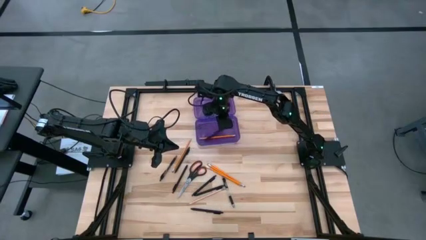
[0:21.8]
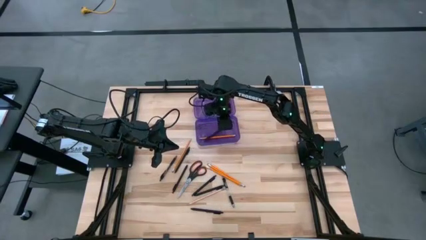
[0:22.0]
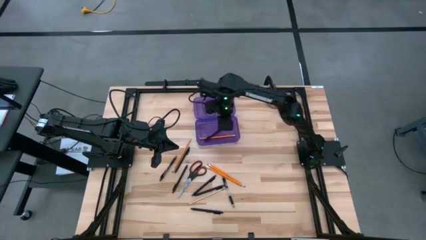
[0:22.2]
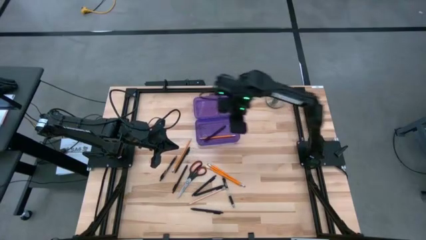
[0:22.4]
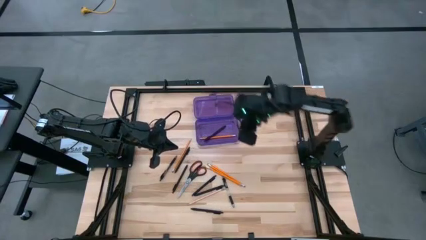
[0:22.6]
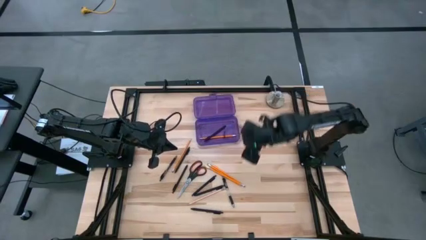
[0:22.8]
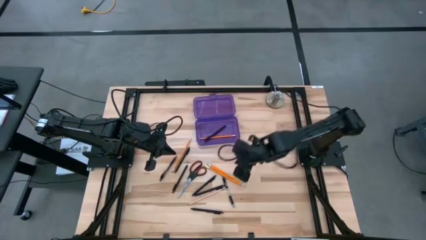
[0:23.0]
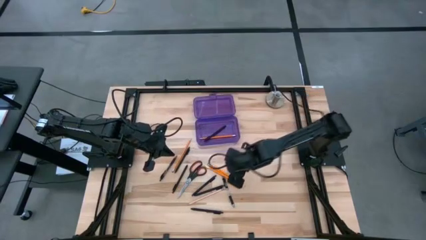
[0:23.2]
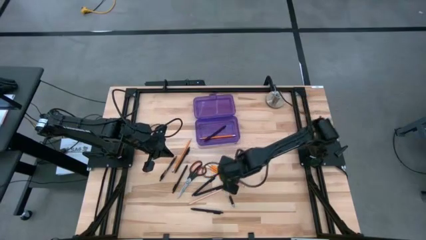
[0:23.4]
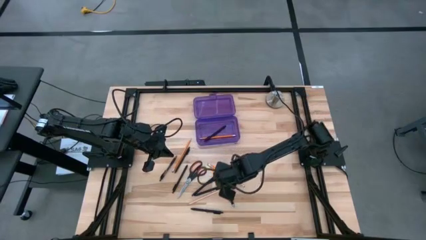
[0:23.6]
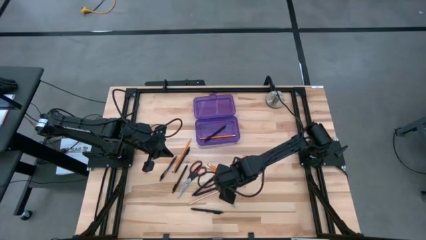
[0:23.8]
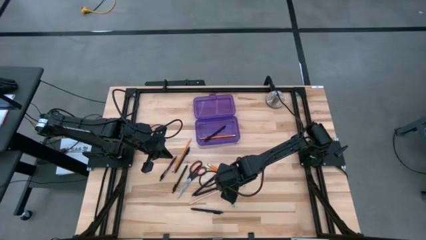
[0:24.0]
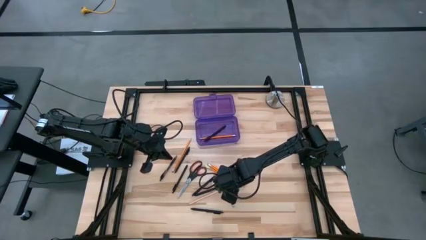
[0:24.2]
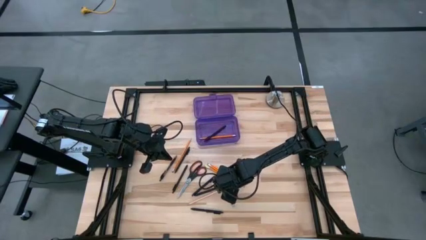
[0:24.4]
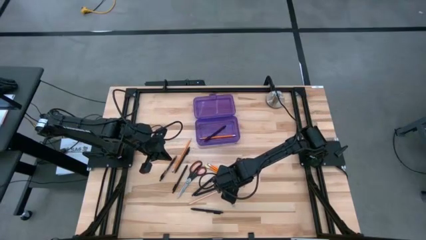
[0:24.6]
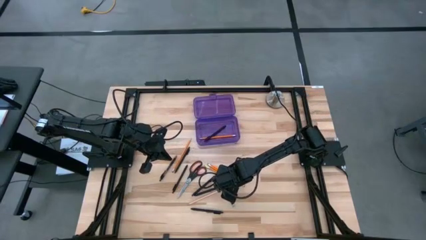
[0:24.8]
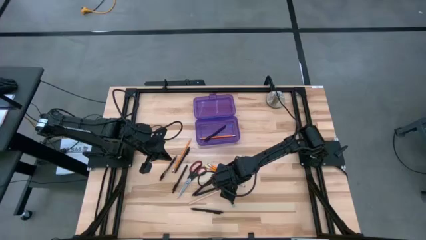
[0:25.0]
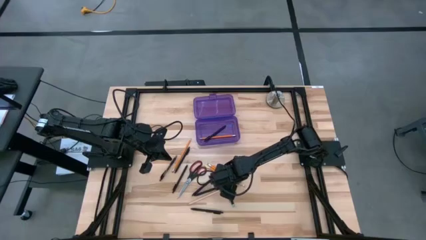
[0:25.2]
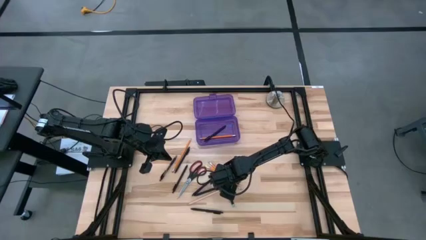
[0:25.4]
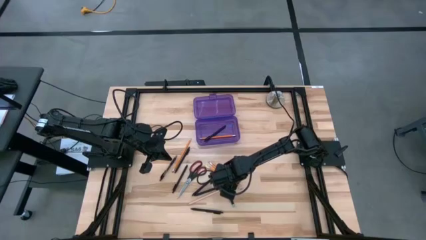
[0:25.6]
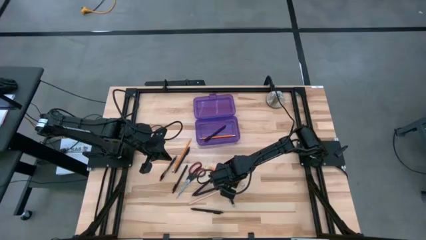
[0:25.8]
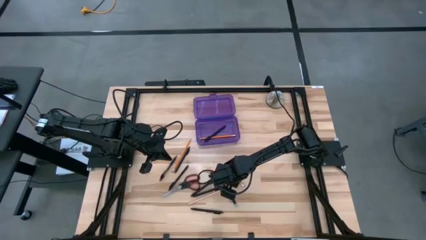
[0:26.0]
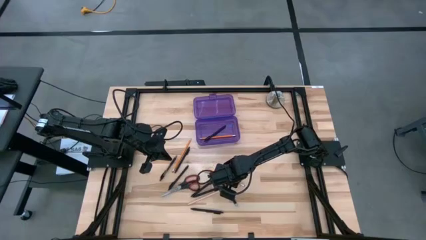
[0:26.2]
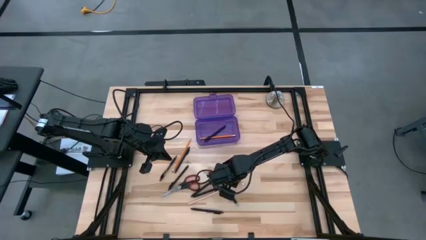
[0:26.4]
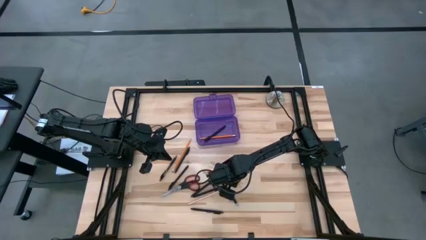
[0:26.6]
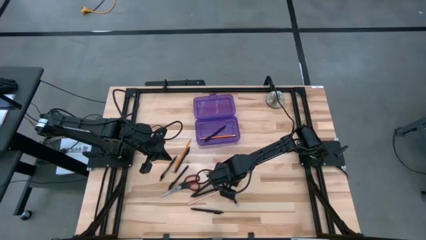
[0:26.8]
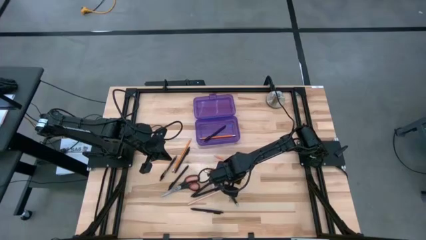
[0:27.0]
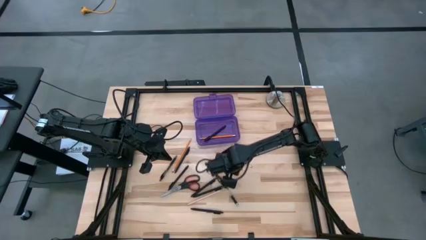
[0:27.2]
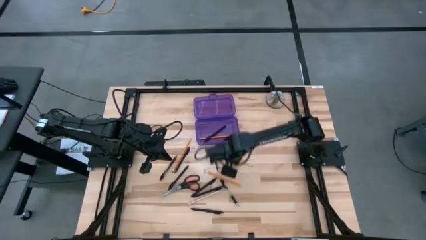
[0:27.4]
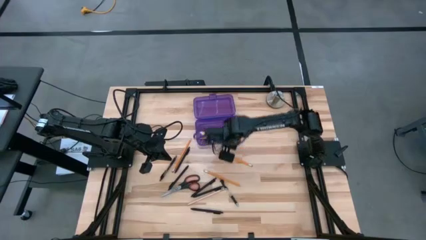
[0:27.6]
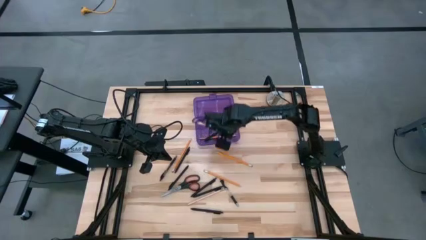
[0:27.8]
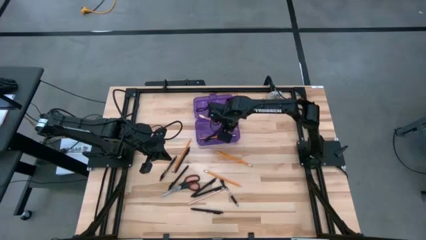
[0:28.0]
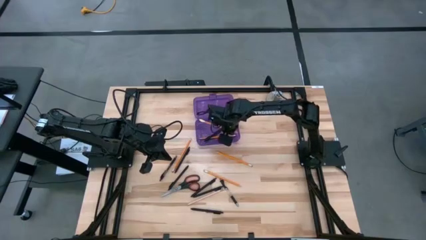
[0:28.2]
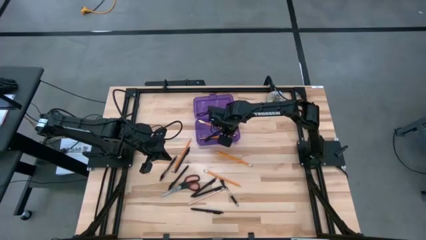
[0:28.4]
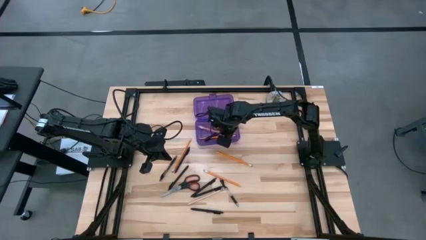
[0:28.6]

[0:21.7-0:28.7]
Task: Pick & place school supplies into a supply box
Put the yellow pencil into the purple supply box

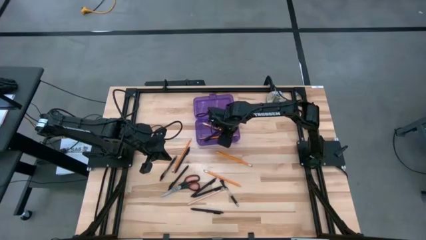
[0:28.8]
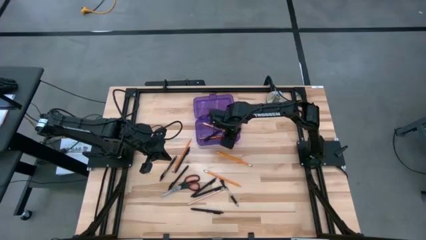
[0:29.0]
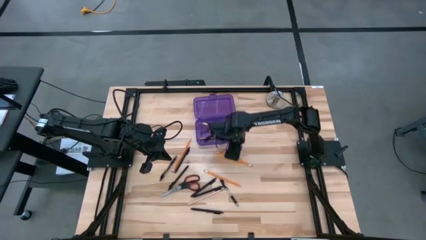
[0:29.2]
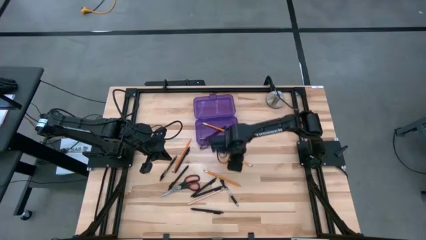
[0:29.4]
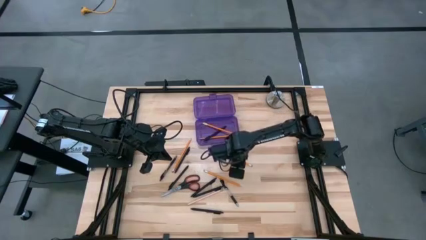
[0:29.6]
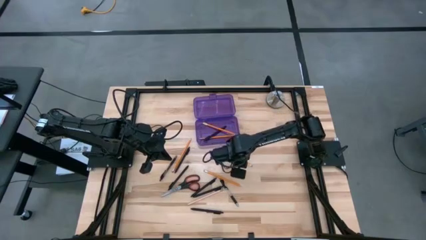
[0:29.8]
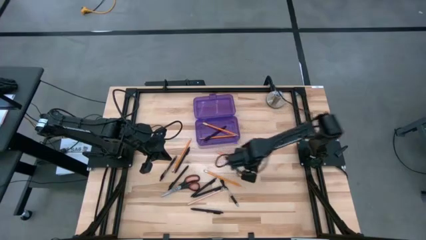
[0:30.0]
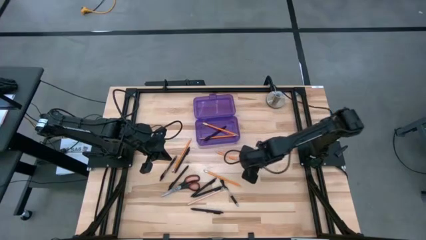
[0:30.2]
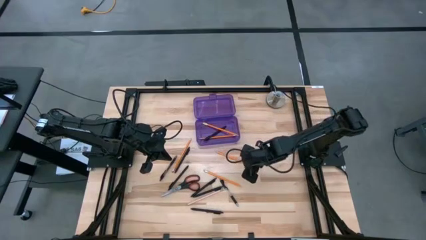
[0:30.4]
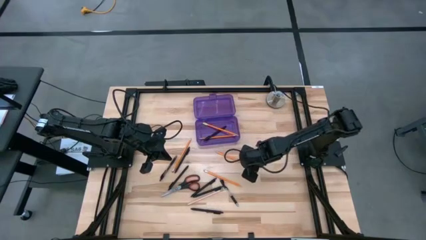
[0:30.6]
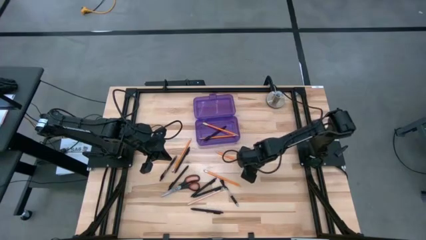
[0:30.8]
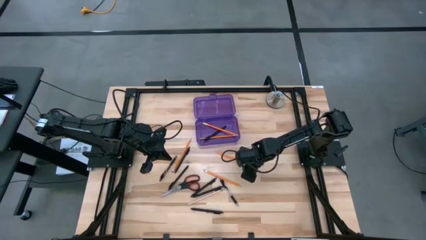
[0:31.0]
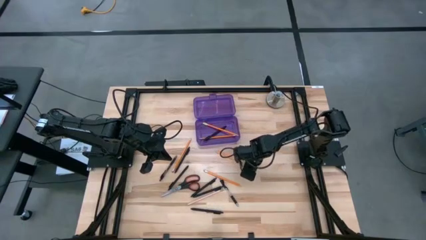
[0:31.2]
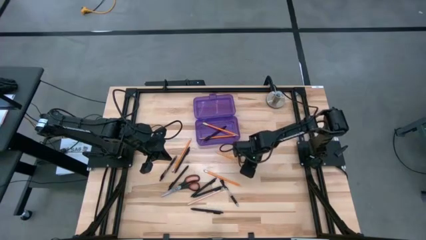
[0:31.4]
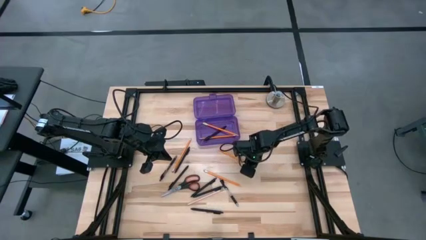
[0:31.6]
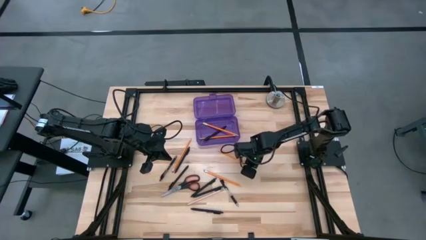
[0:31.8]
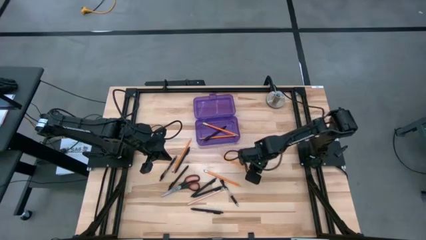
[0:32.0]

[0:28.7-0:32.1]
Put the yellow pencil into the purple supply box

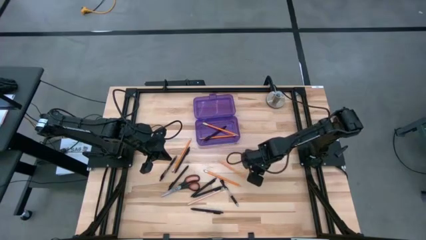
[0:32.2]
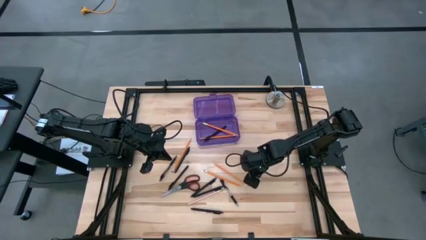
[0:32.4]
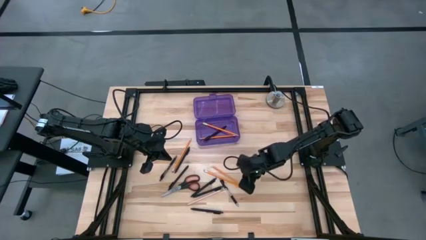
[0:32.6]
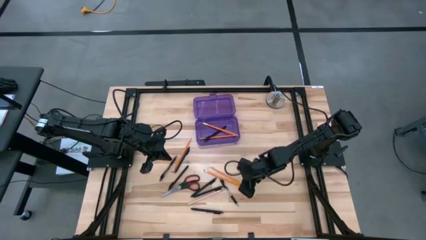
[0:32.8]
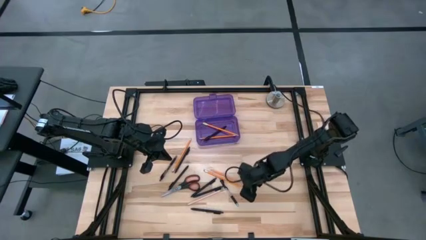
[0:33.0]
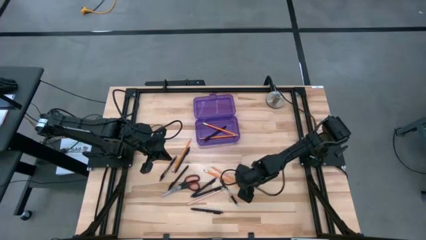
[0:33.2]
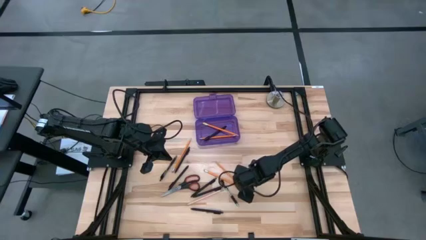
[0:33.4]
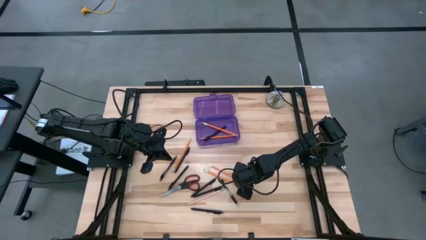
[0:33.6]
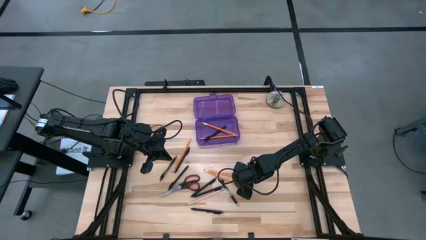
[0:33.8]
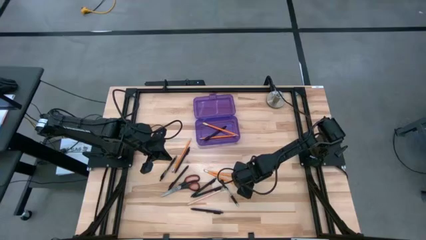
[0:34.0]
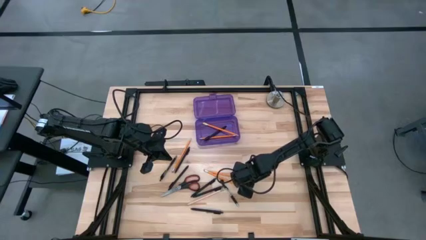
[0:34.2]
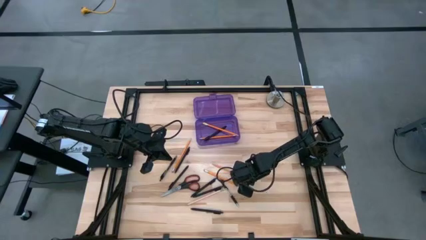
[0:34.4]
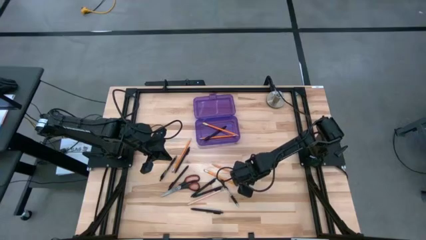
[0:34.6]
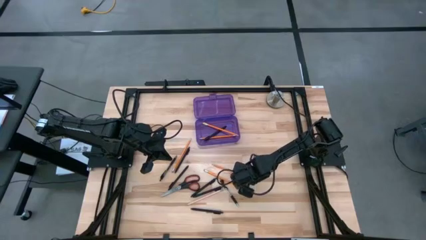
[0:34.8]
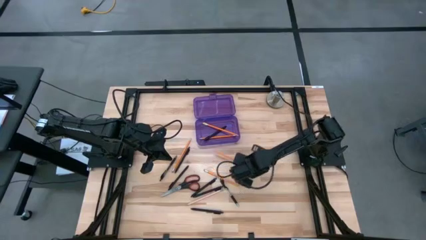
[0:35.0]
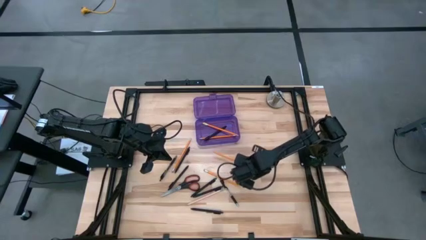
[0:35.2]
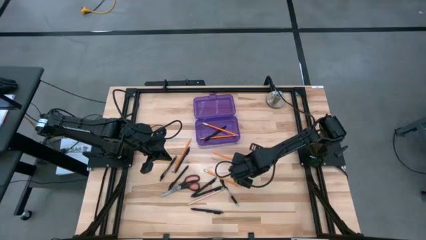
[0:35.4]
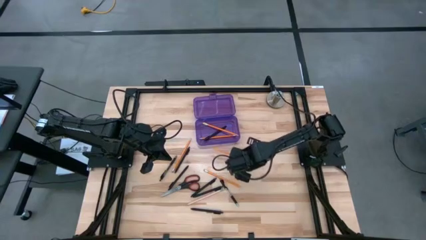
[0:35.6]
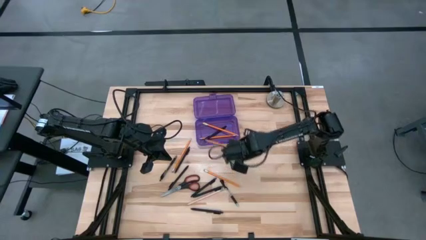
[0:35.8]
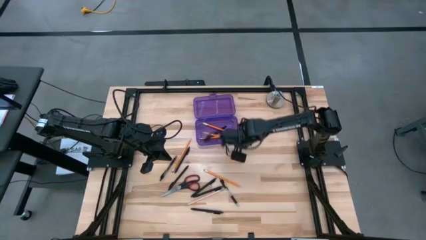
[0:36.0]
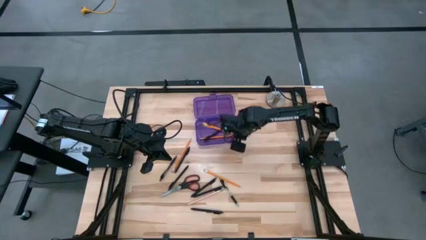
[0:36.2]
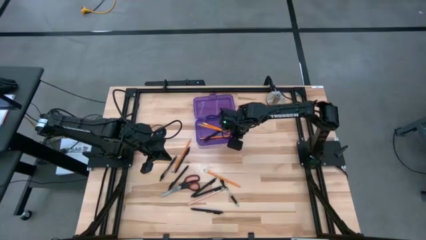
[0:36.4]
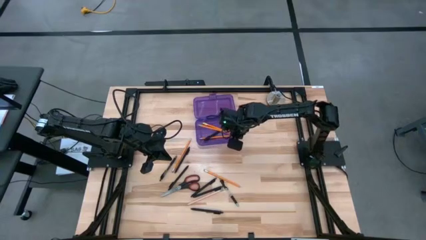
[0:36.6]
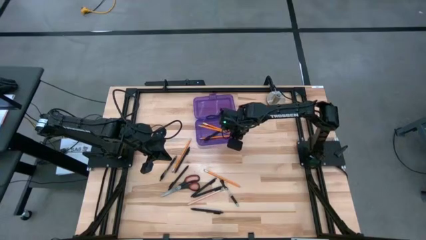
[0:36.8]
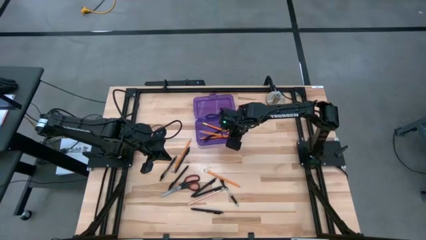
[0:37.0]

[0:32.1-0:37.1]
Put the yellow pencil into the purple supply box
